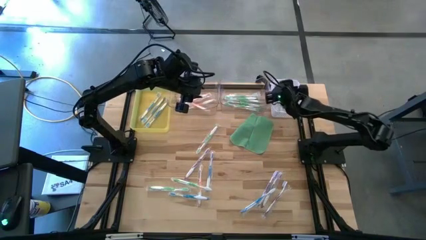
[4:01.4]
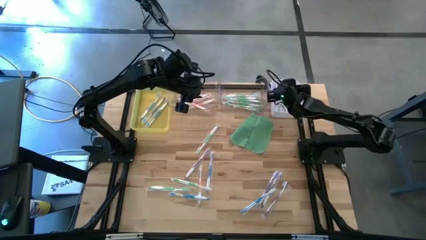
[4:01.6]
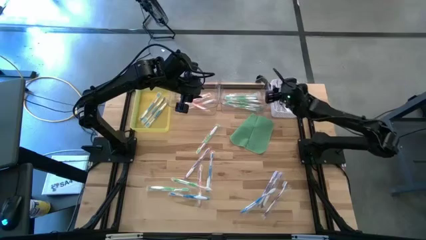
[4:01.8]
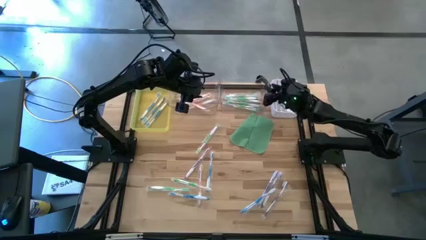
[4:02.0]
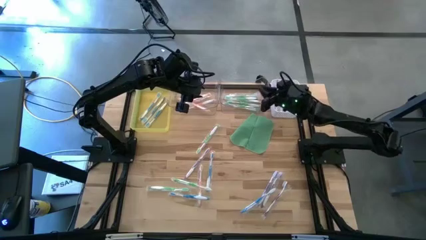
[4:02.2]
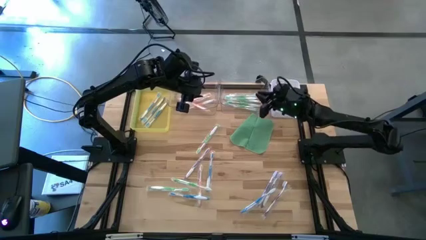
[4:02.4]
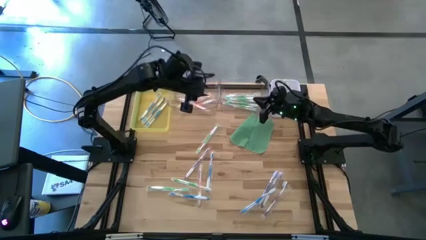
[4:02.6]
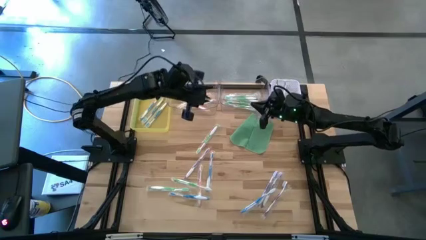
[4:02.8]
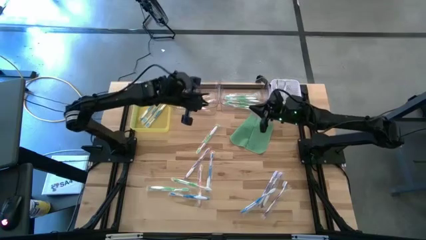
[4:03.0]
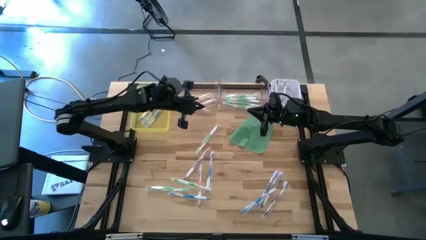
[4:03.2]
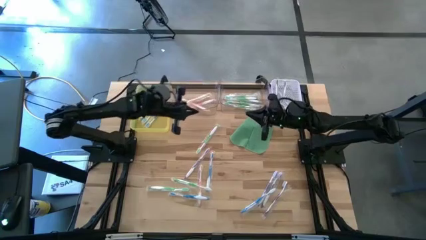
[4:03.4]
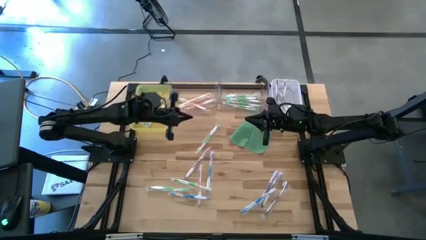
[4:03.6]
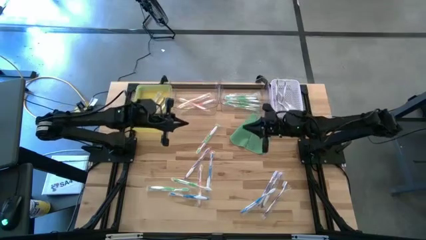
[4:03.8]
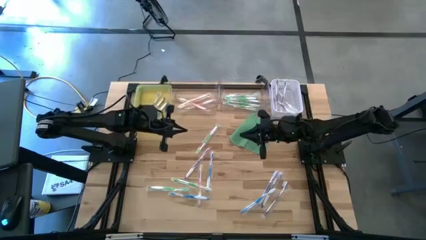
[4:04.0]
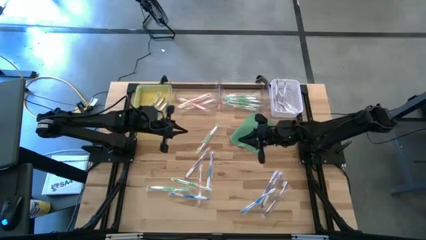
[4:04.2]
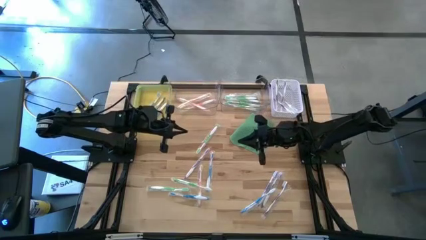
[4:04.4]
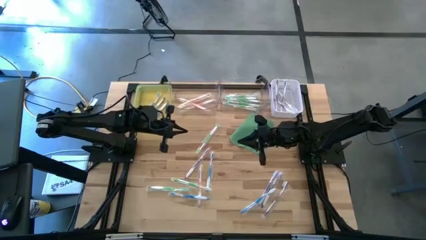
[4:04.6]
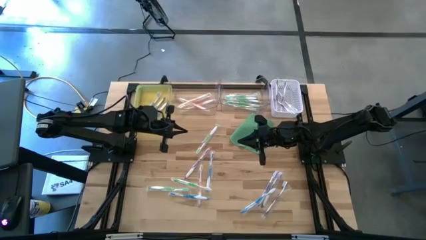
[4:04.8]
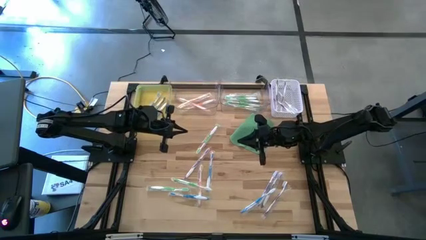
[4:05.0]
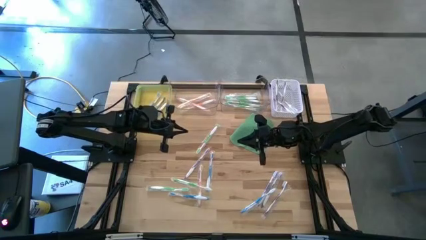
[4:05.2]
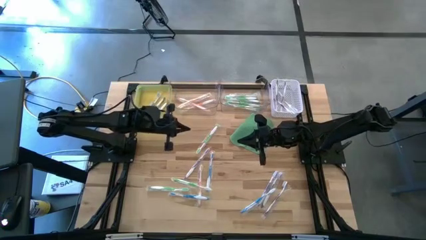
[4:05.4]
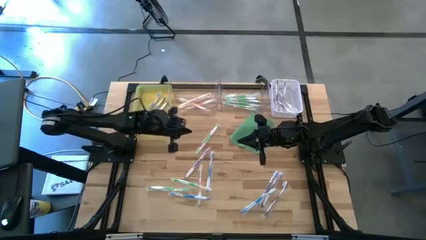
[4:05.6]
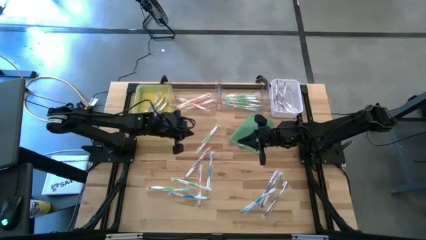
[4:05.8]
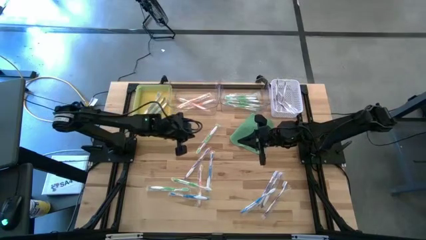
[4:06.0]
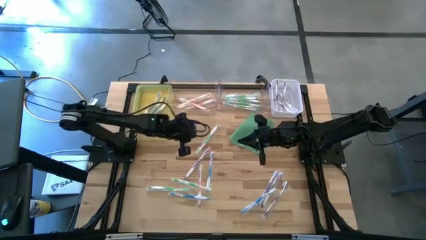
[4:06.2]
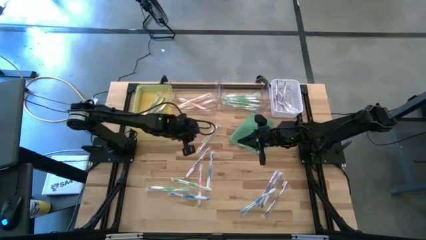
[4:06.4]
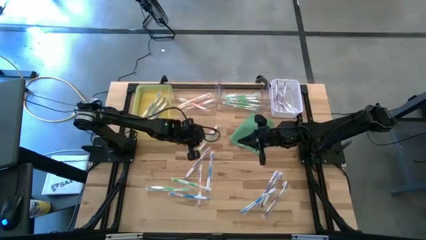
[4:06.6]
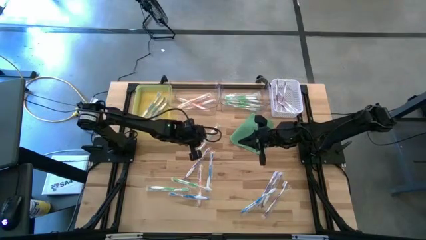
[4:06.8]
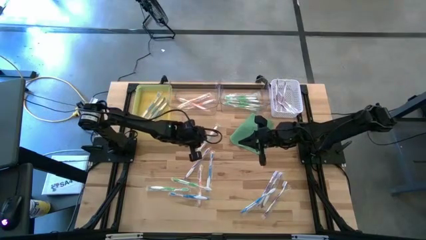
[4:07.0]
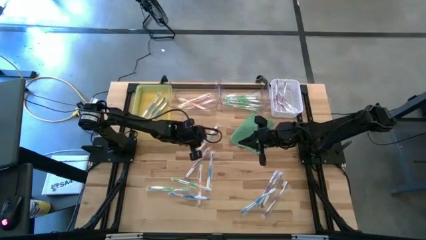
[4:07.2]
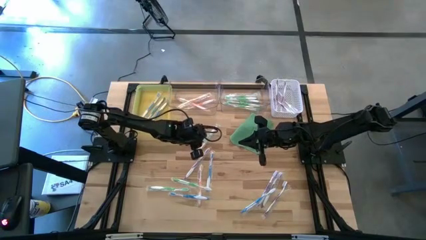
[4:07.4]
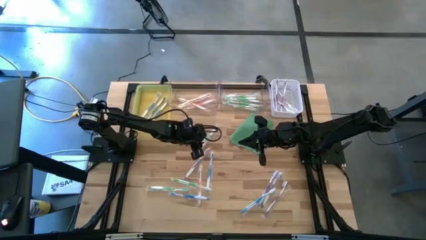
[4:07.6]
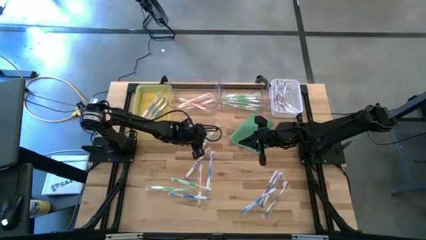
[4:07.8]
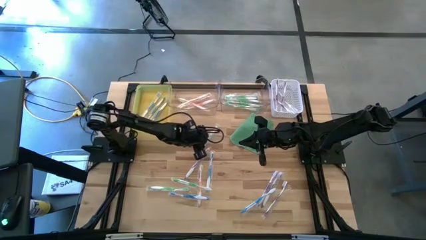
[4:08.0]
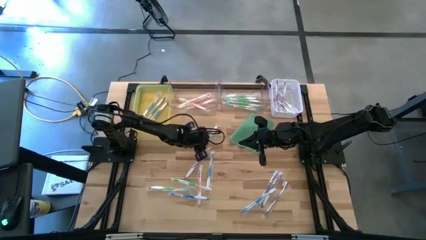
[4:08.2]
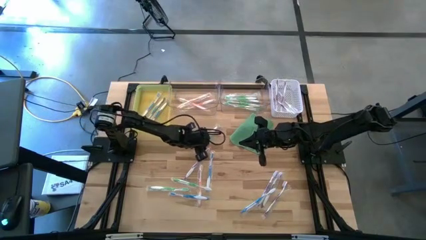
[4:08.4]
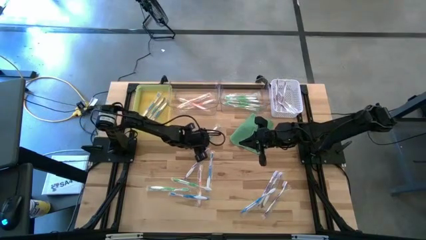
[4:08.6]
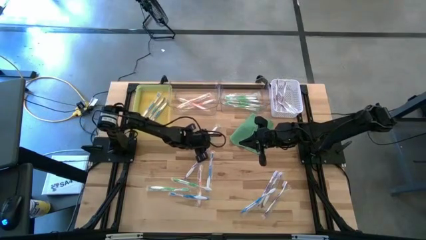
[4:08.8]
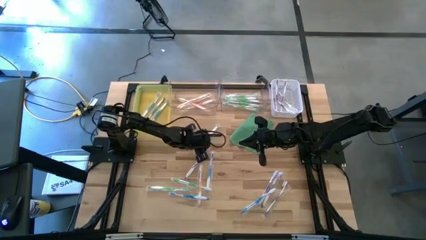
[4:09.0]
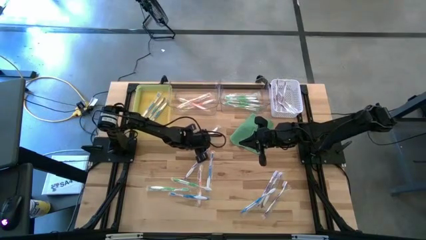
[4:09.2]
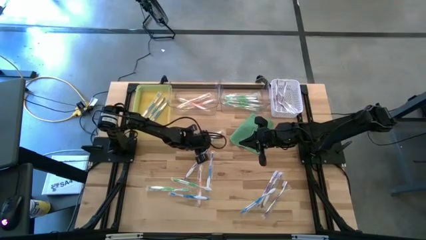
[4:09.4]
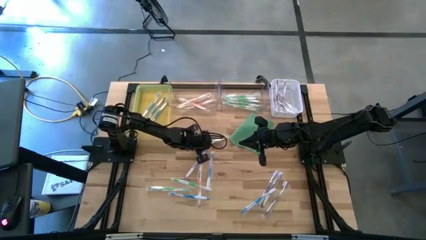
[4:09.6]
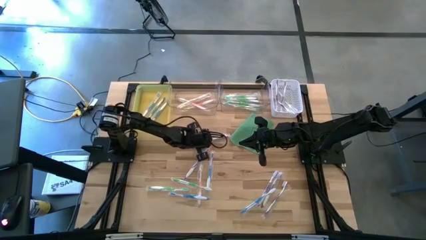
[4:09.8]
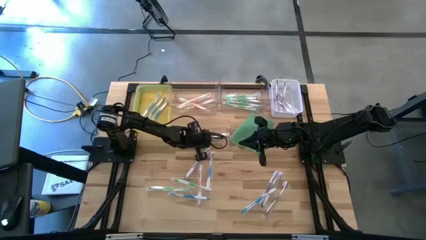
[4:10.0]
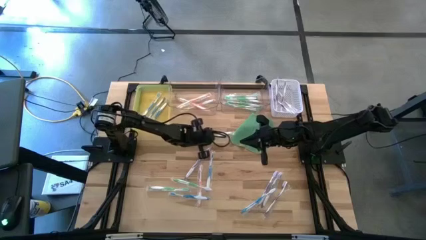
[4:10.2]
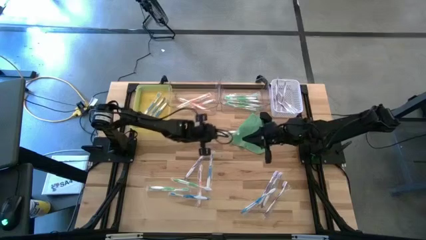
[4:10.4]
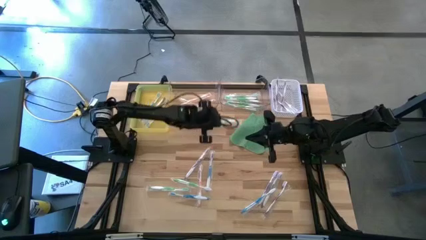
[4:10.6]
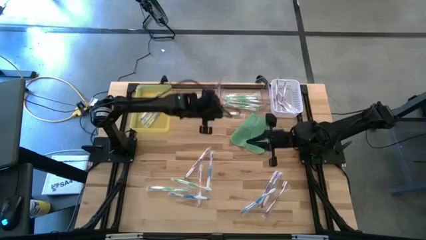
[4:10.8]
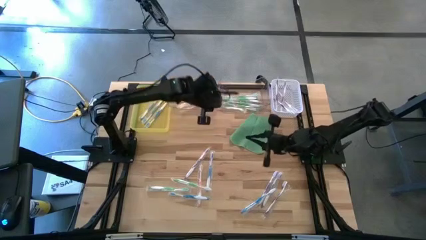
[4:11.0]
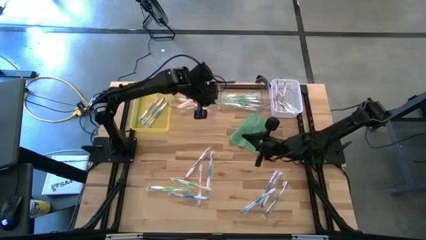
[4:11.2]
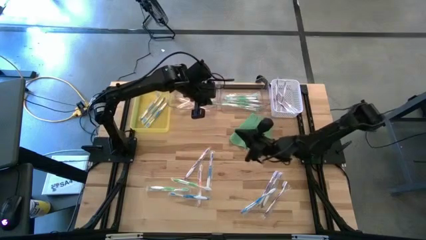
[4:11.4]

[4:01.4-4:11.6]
Task: Pick & Place Toothbrushes
Put the green toothbrush into the right transparent bin

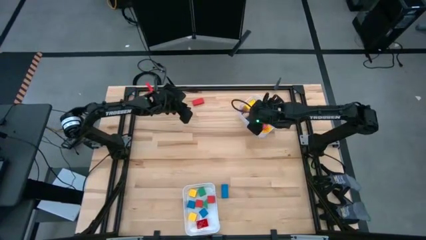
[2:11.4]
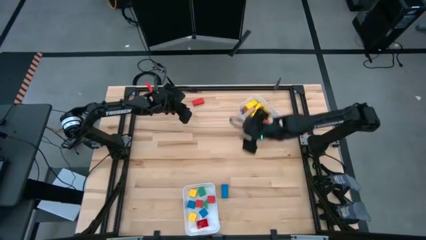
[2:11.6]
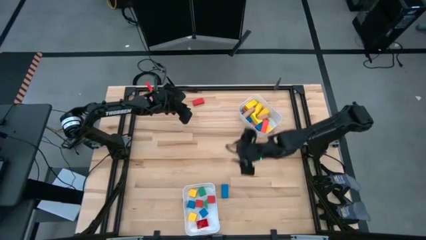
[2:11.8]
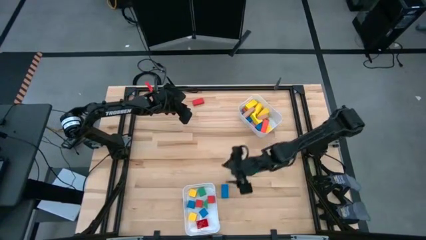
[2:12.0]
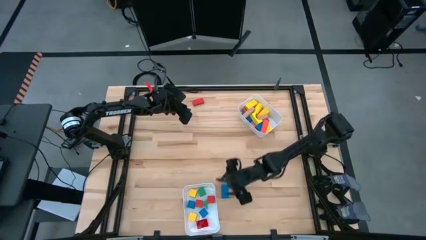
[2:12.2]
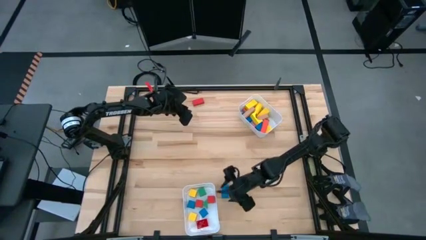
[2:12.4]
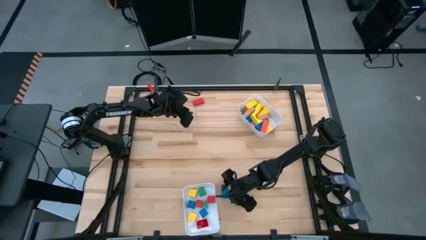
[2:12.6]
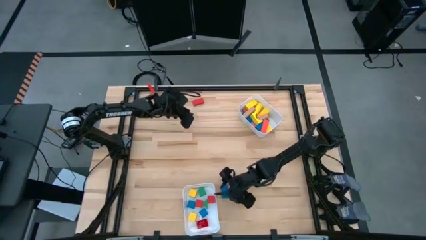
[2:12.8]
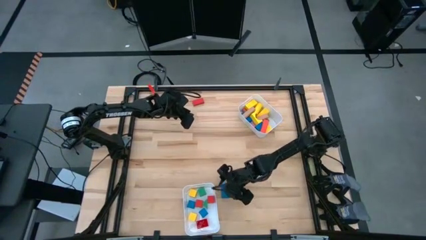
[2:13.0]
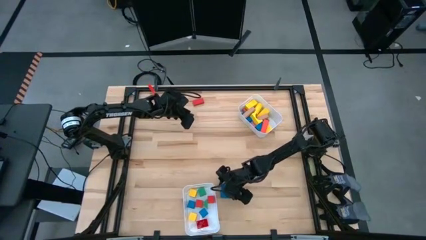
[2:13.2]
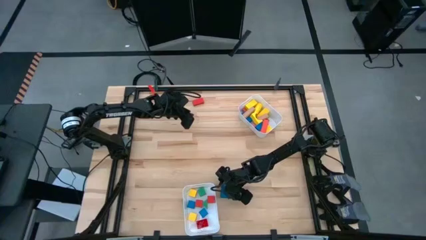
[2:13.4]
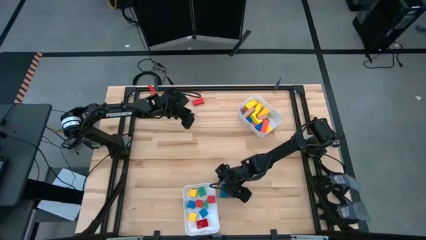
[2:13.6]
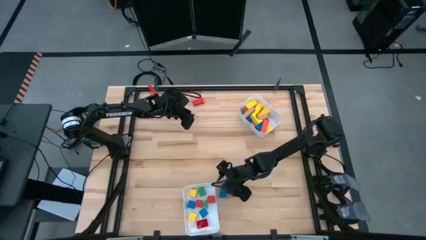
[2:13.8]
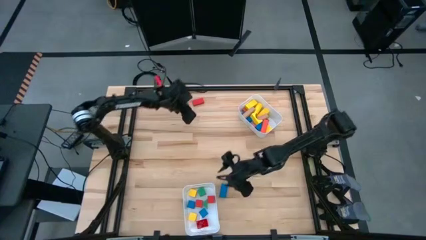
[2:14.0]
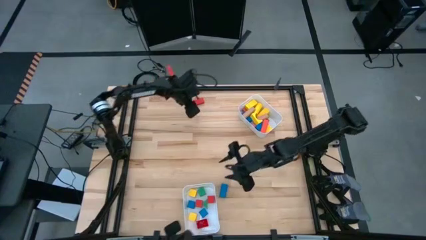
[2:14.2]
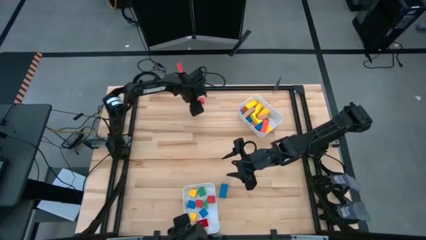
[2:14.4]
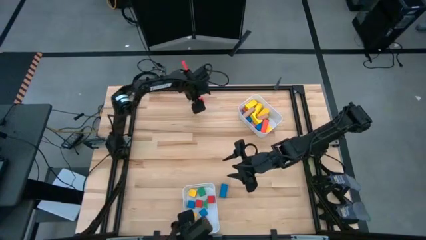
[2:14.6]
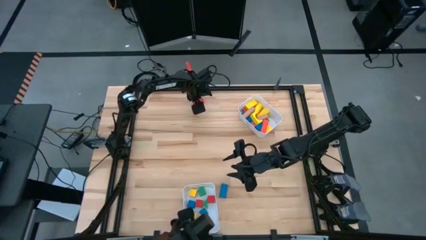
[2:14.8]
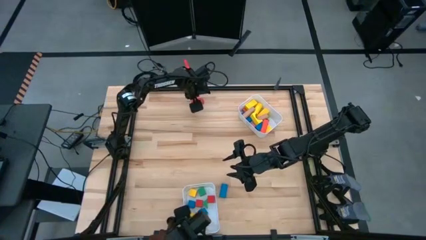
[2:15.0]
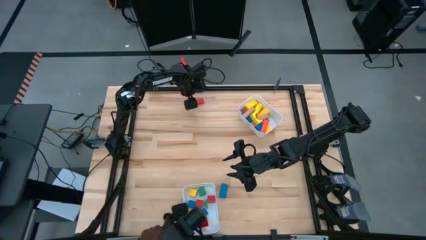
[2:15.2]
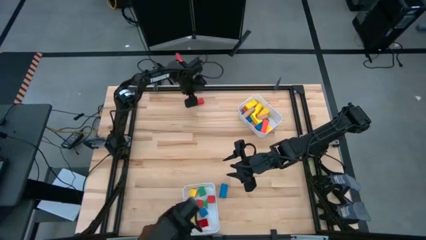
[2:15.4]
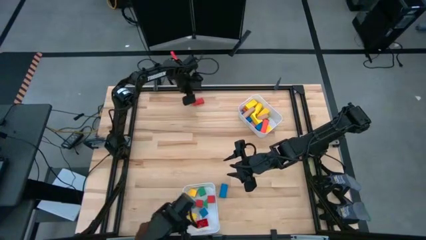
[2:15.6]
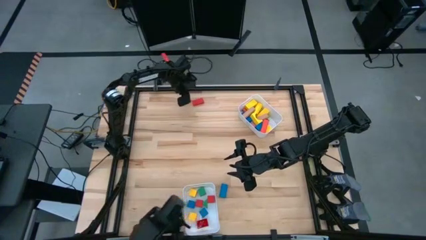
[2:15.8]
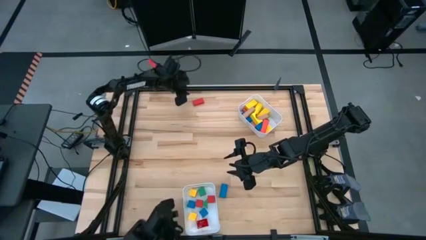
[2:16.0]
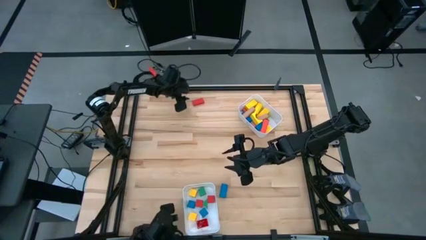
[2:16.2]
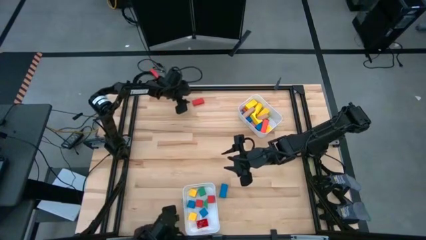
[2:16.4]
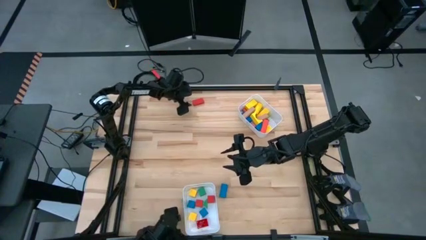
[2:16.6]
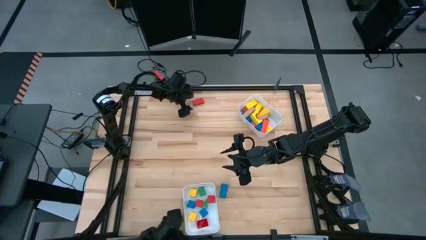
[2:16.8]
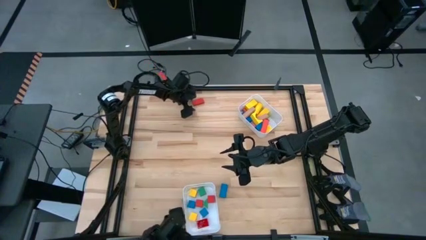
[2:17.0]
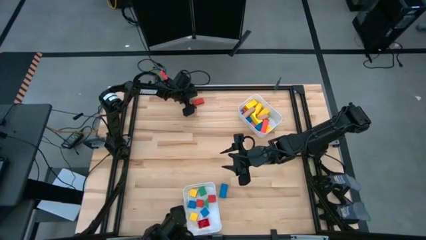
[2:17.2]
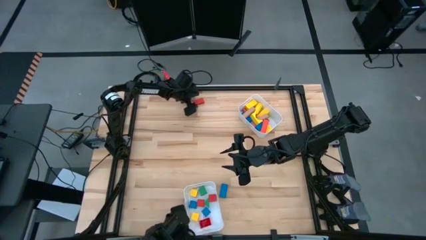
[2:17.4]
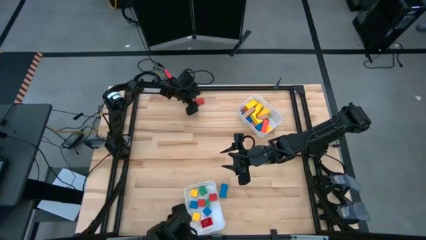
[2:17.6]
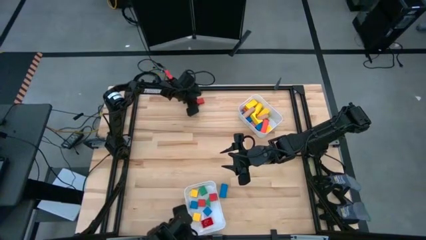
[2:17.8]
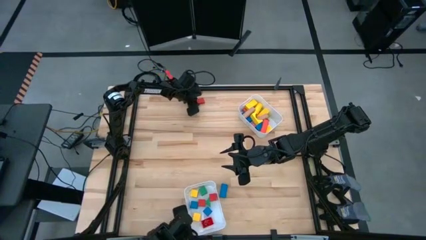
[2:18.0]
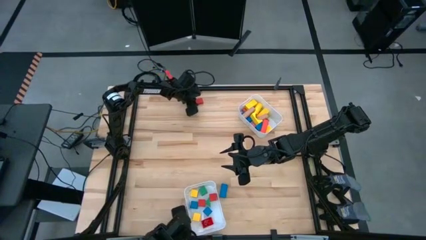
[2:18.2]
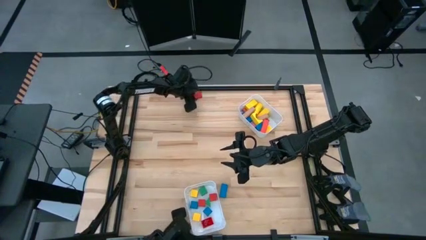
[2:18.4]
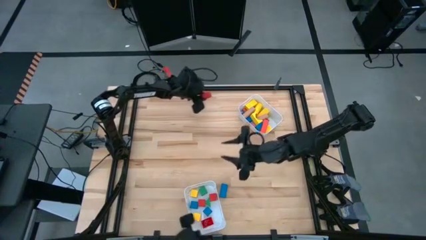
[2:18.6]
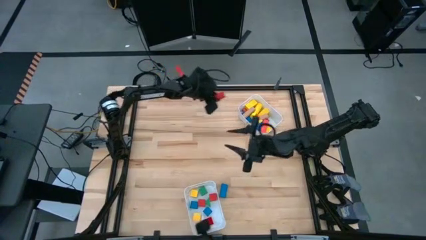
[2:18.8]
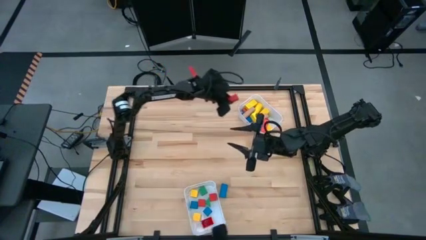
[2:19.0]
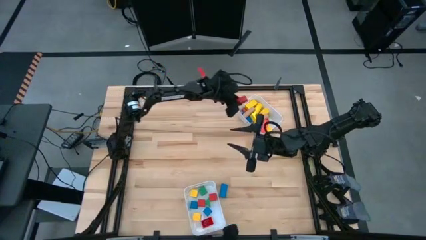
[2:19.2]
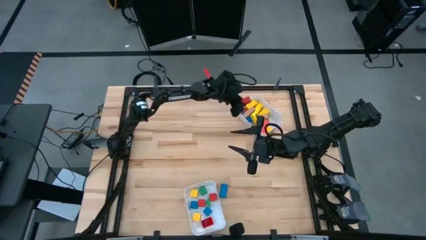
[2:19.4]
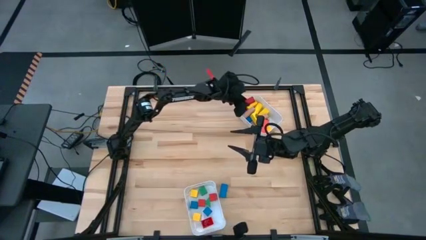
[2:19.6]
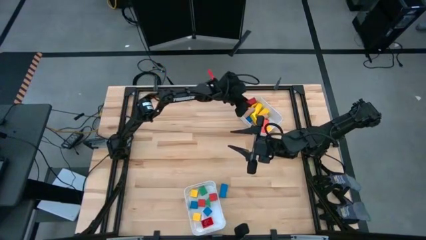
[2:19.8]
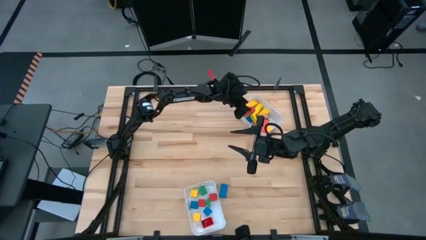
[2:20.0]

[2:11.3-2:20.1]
Task: Sort blocks by size
Put the red rectangle block into the top white bin
